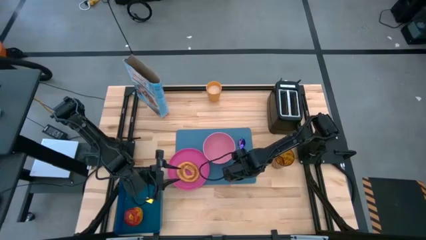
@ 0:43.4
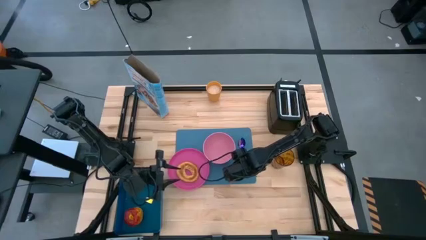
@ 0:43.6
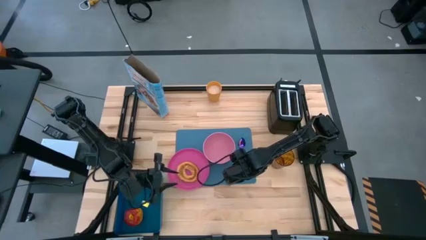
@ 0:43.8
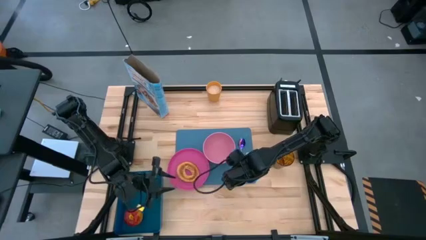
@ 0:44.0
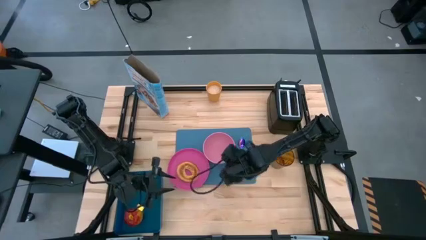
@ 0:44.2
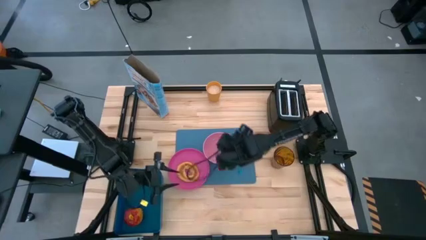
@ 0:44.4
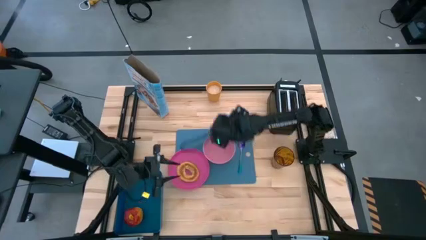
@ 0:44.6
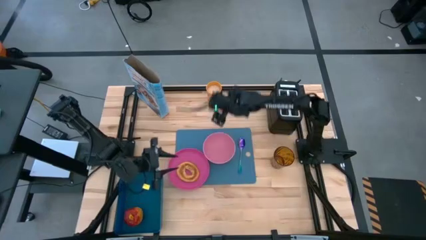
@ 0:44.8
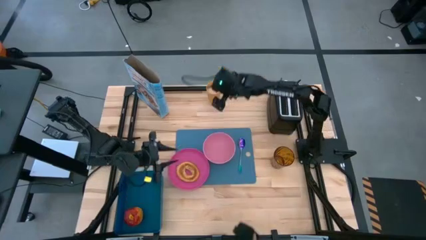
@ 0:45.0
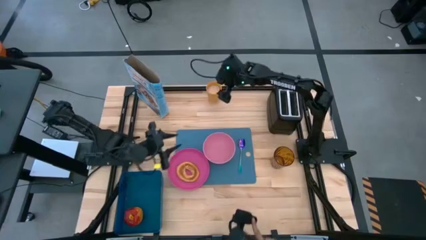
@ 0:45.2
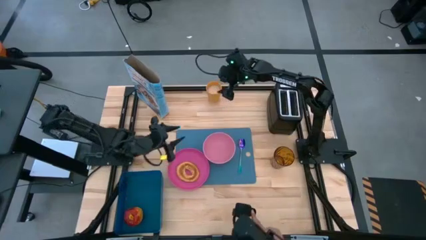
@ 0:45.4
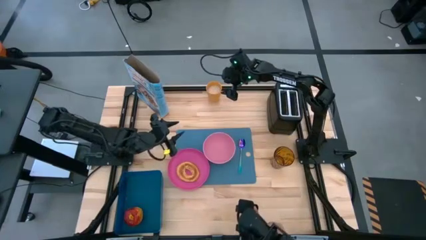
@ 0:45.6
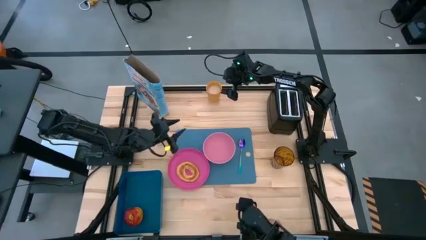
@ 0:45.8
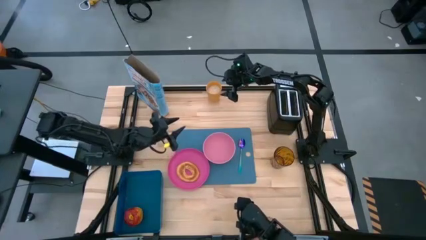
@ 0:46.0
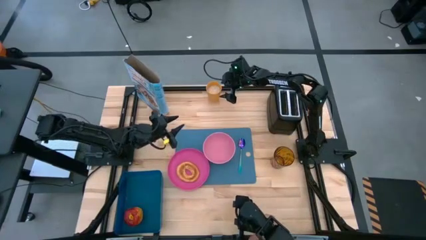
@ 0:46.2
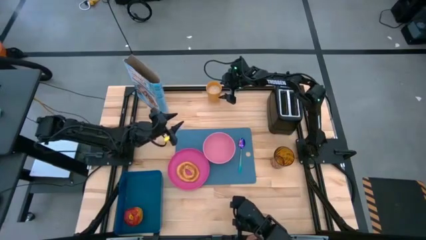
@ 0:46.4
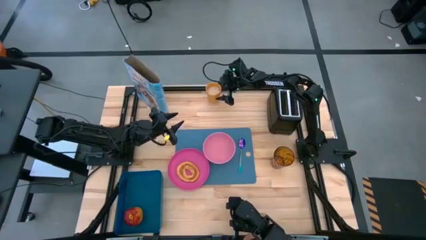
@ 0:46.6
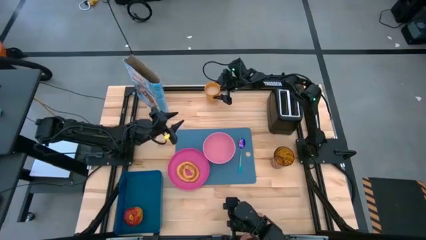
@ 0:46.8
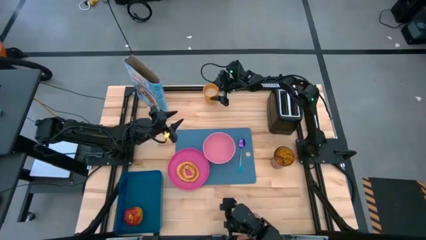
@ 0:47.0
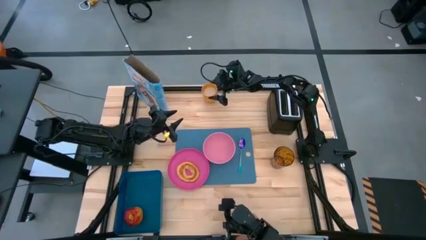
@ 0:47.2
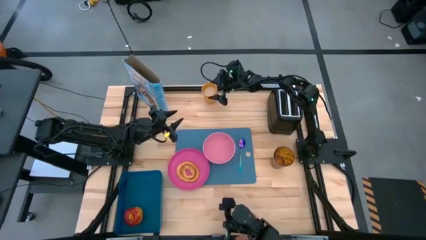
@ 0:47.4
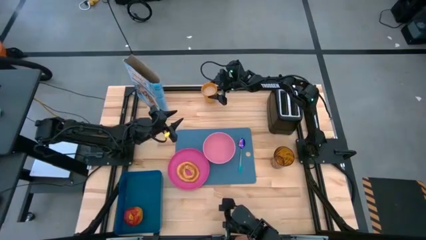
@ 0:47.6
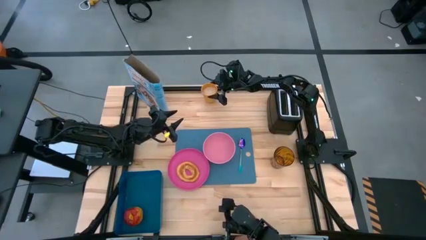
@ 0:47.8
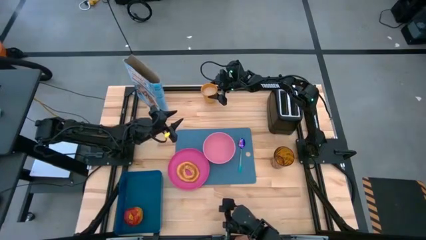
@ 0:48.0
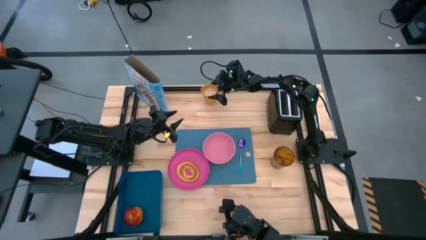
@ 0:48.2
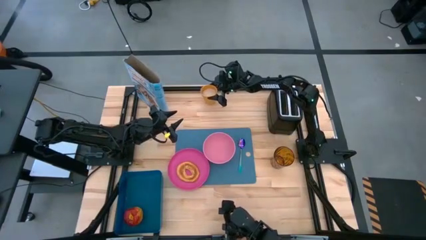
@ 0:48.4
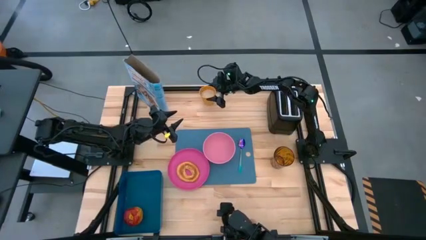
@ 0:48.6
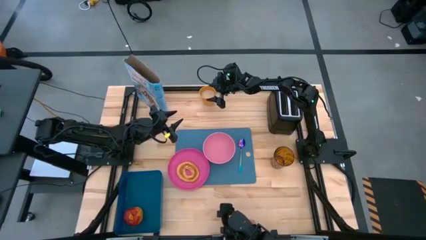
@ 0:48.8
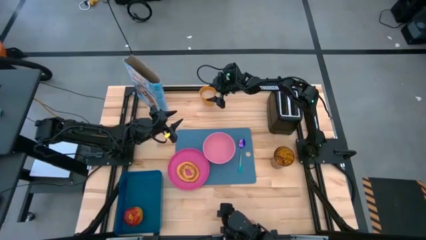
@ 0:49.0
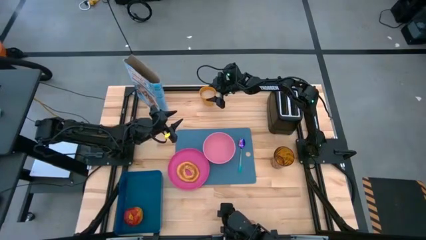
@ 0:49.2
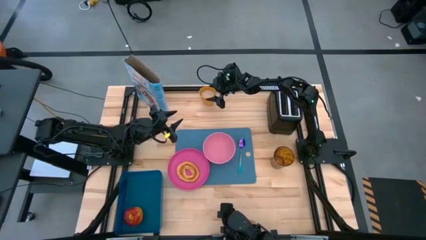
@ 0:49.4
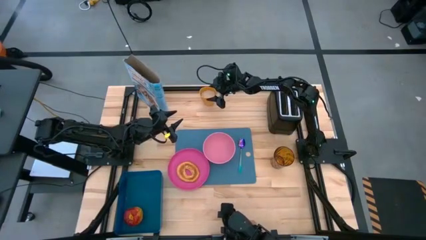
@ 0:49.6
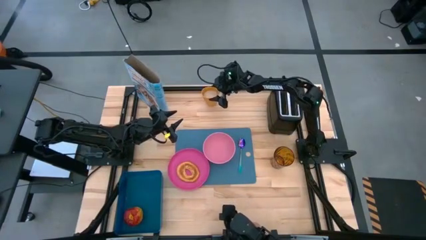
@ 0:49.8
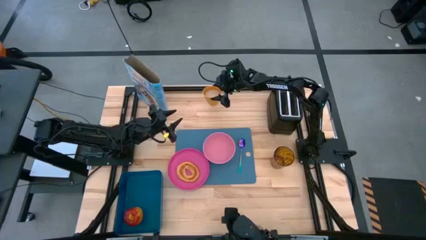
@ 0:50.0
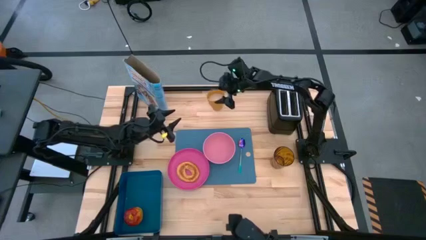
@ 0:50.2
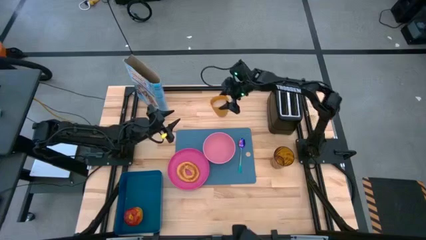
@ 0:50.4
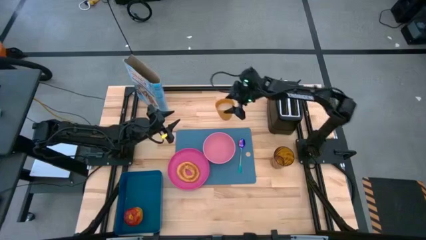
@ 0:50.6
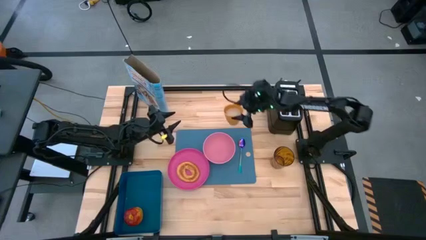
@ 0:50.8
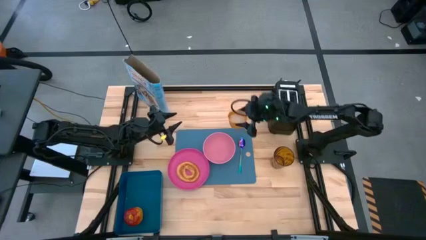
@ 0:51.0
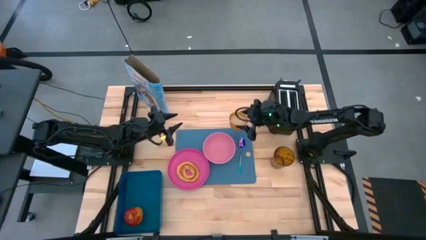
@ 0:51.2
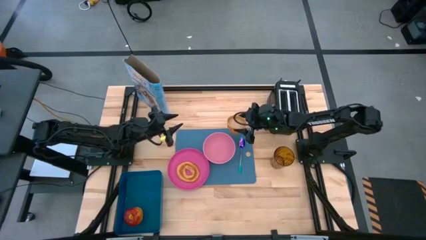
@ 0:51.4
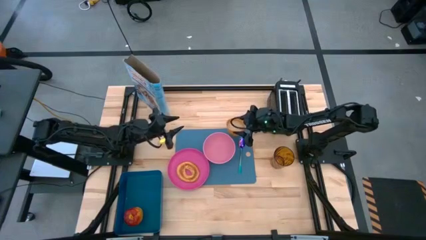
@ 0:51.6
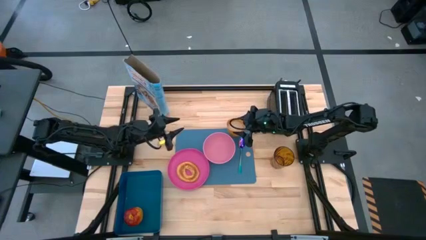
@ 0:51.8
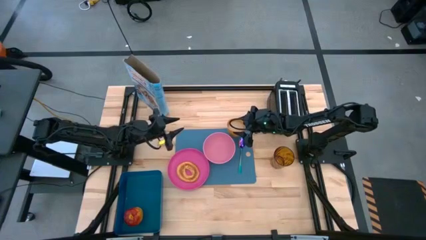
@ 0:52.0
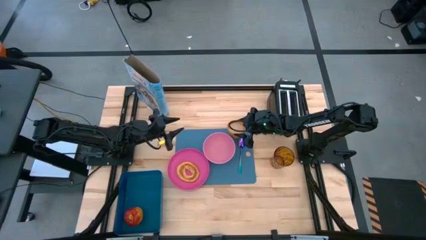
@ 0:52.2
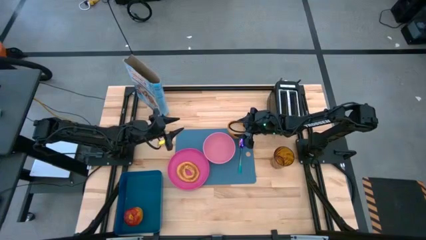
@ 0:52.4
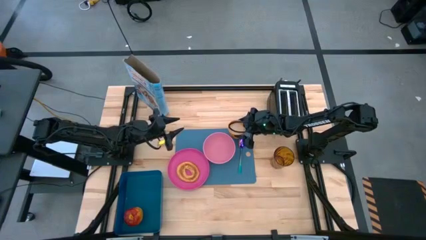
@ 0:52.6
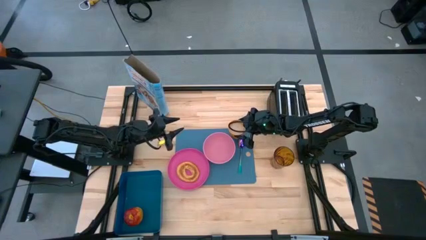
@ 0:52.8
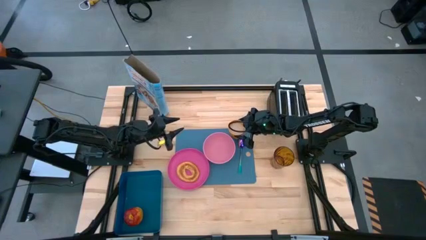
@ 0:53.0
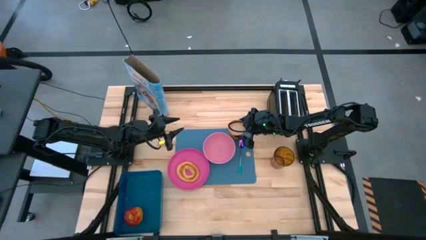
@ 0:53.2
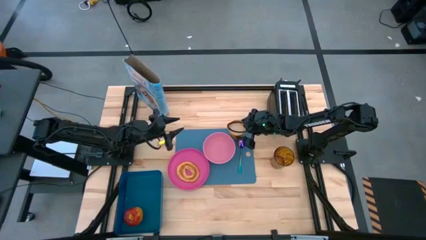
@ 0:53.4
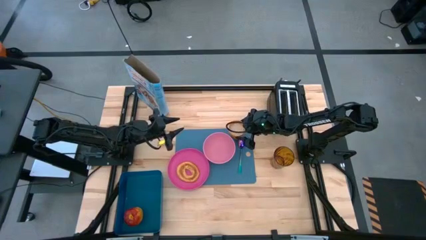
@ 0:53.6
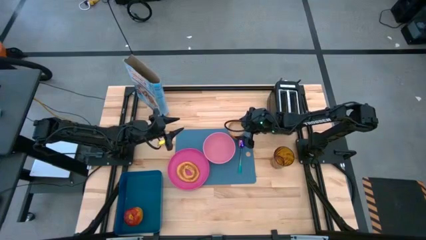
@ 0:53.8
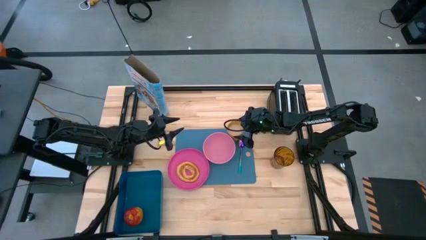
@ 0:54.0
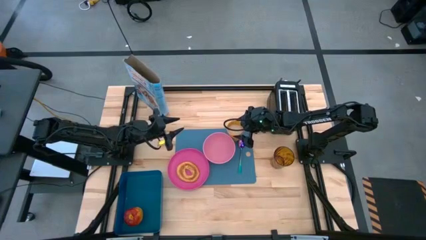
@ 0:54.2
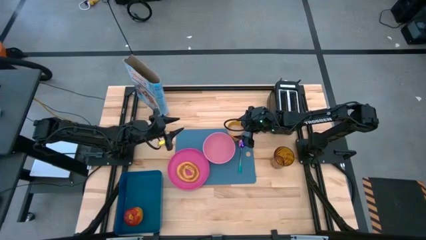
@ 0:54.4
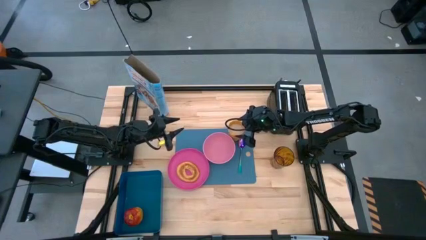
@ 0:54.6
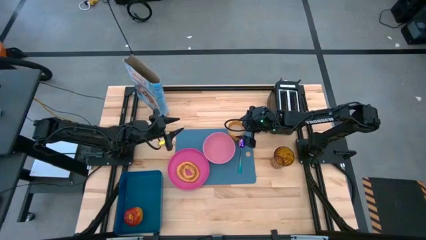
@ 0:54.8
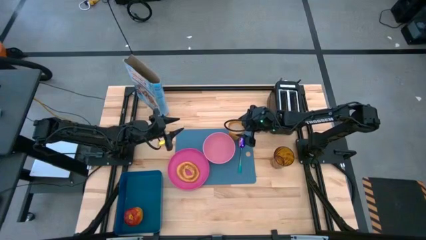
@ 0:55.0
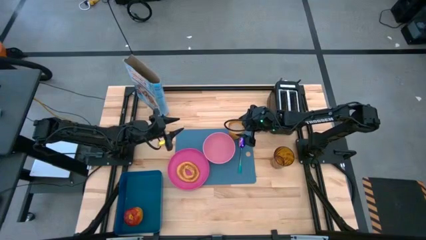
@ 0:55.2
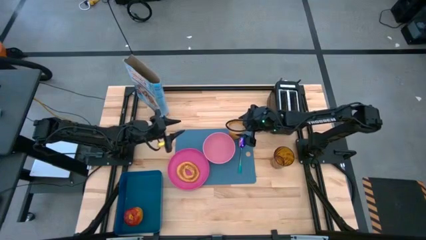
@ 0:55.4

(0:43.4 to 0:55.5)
Task: Arrange a breakfast setting
Put the yellow cup of milk on the blue tablemat to the top right of the pink bowl

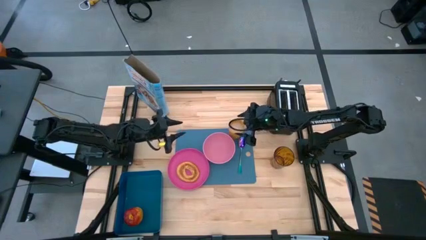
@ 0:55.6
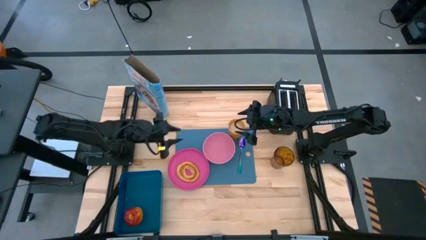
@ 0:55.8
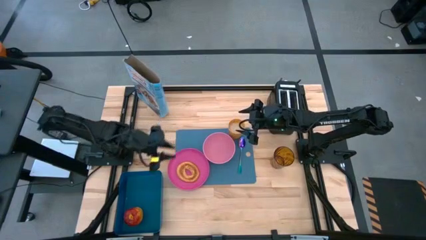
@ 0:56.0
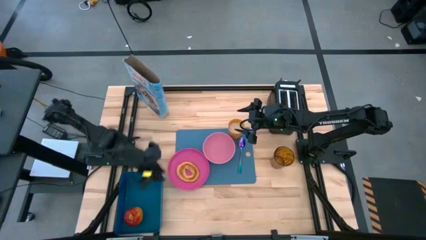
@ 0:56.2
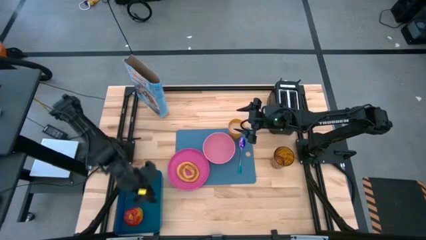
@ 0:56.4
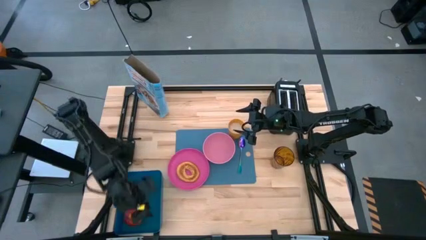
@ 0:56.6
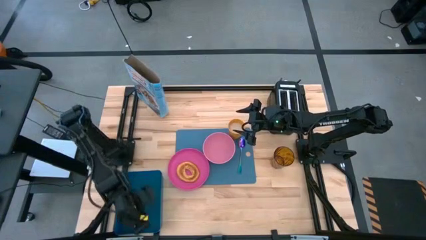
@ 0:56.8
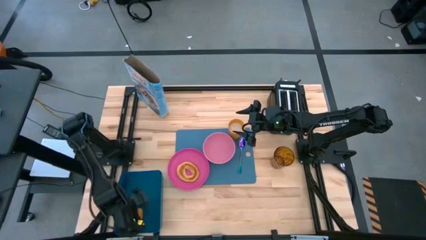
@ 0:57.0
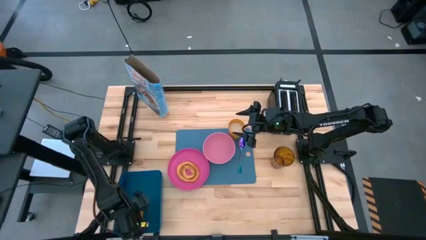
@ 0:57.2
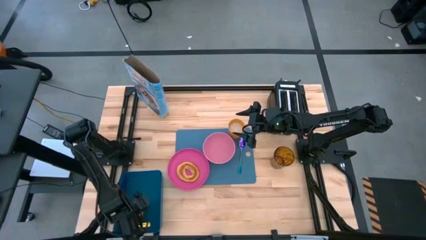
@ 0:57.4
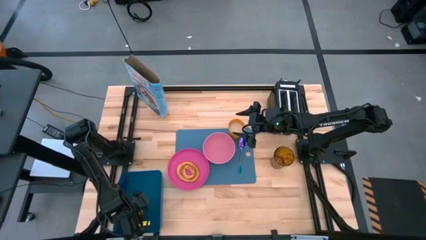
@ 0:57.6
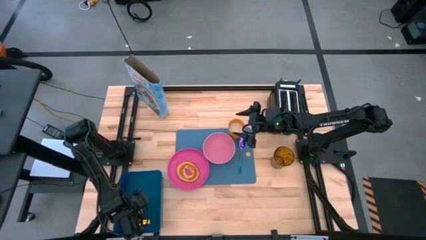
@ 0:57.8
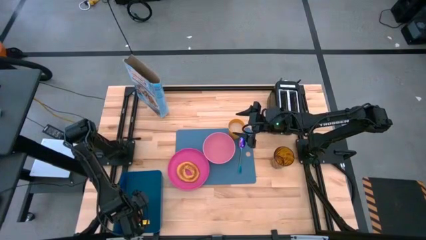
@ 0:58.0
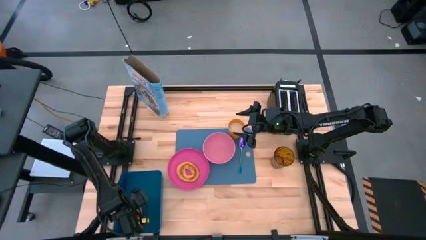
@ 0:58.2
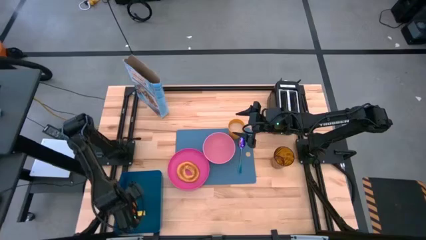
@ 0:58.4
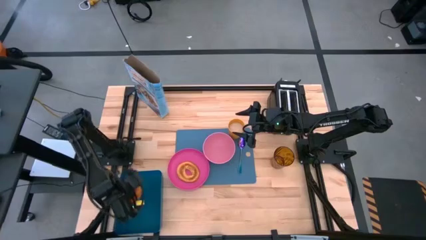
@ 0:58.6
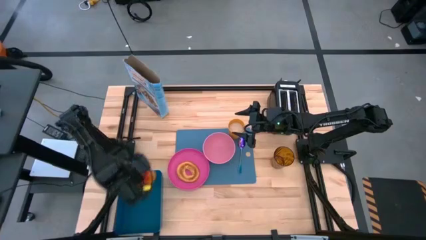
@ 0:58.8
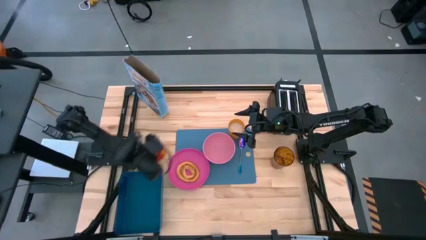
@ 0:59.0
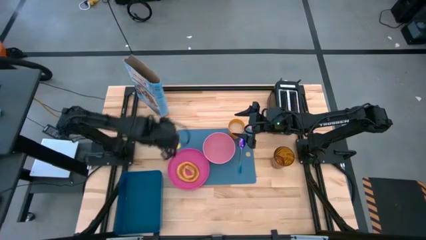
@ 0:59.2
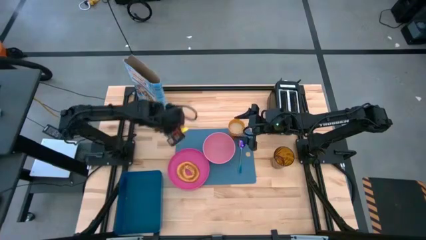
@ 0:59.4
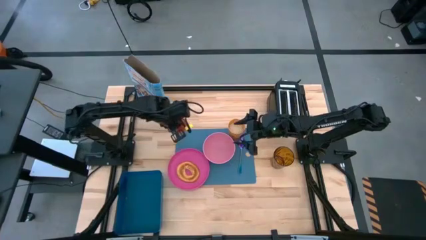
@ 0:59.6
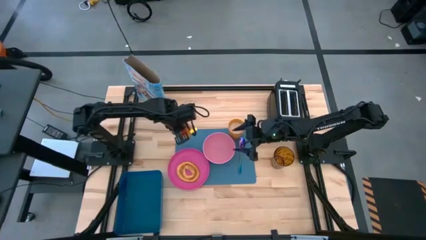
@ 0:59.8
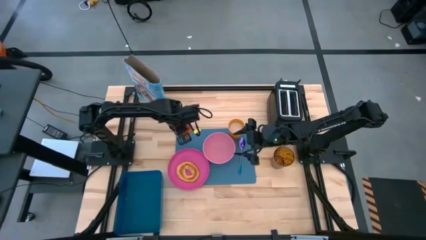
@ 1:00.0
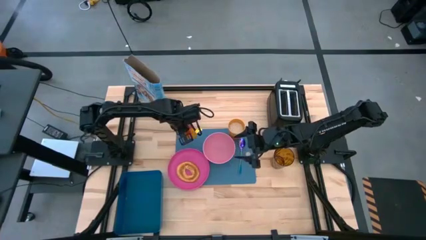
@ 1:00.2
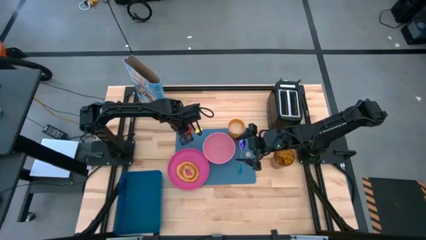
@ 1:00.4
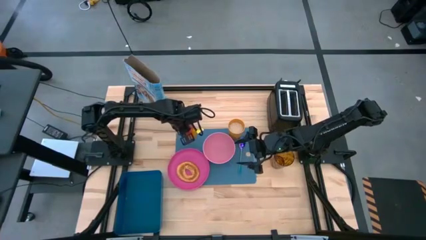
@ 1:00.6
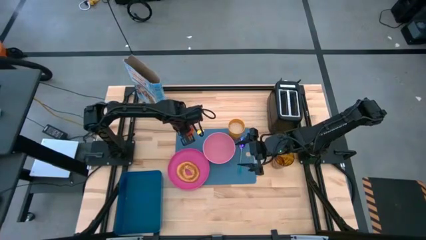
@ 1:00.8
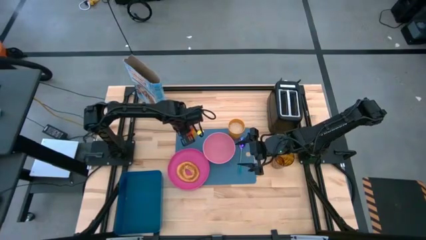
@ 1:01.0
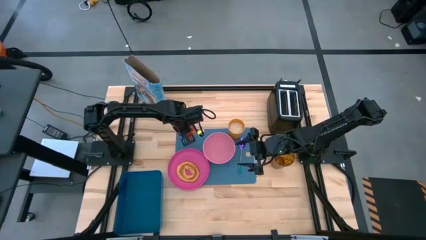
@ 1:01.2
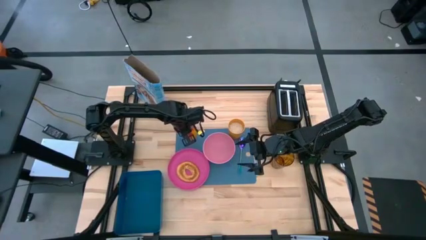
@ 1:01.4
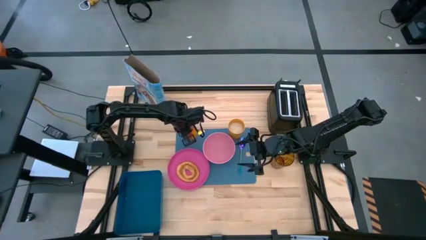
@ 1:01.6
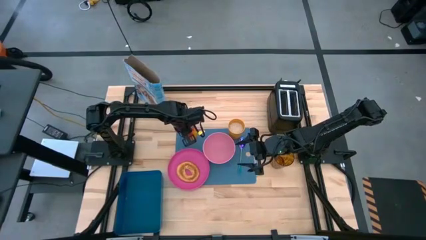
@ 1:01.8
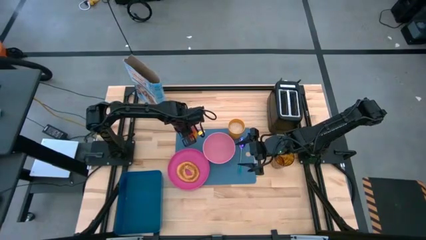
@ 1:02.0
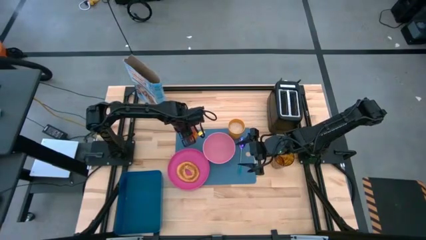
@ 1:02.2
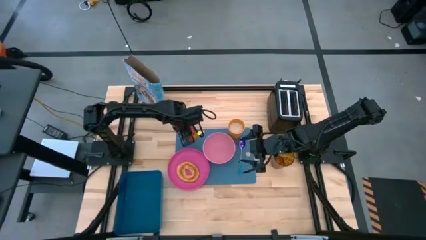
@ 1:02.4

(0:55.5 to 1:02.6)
Put the red apple on the blue tablemat to the top left of the pink plate
